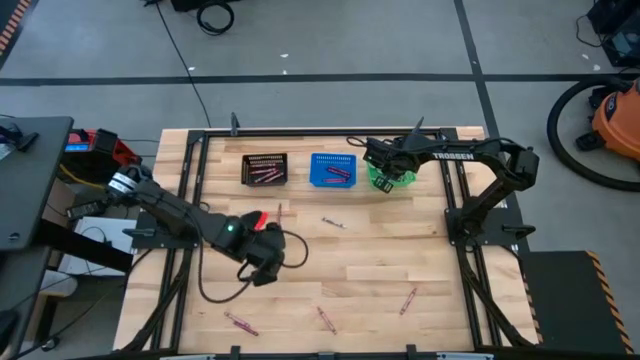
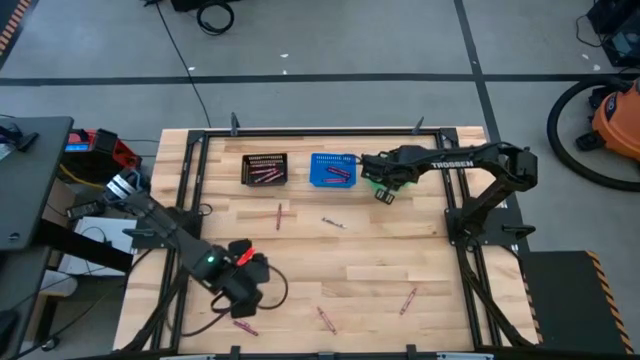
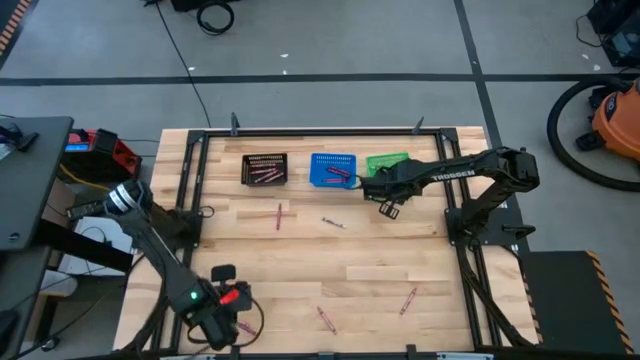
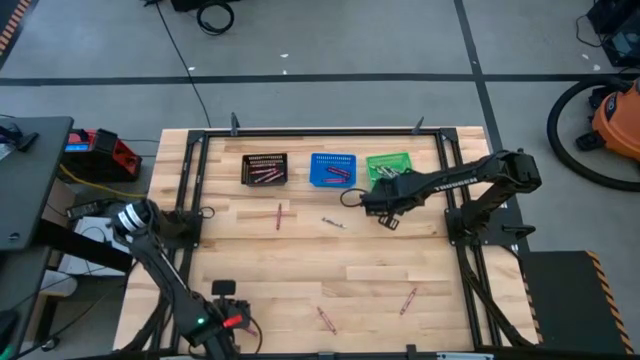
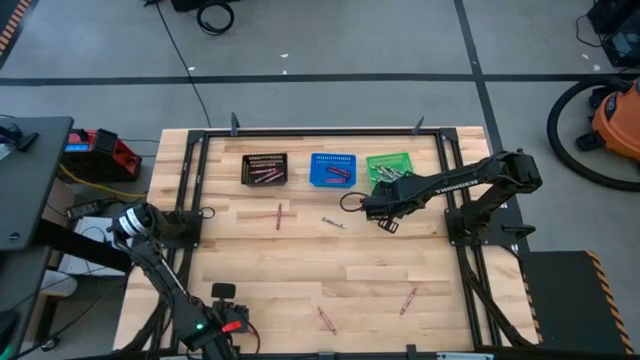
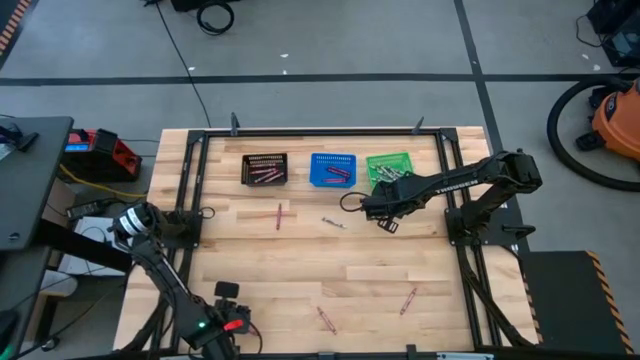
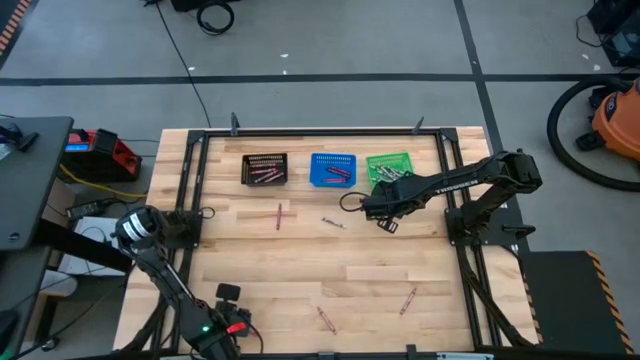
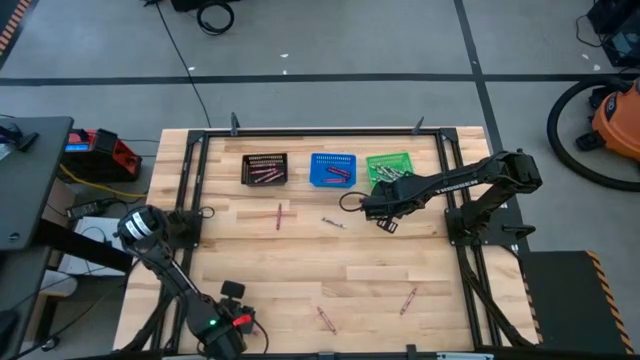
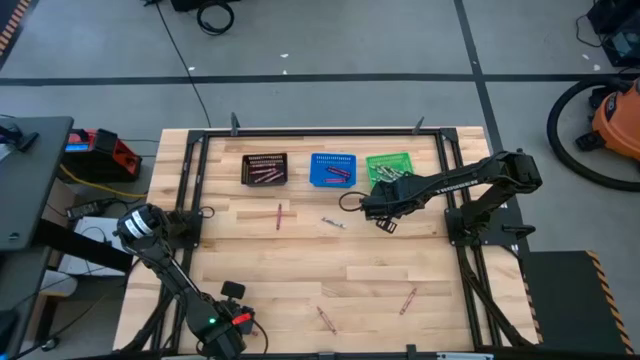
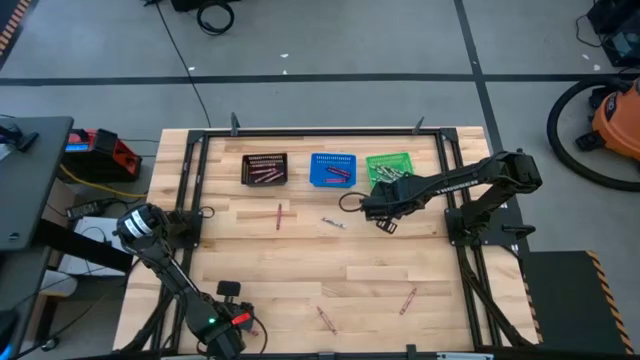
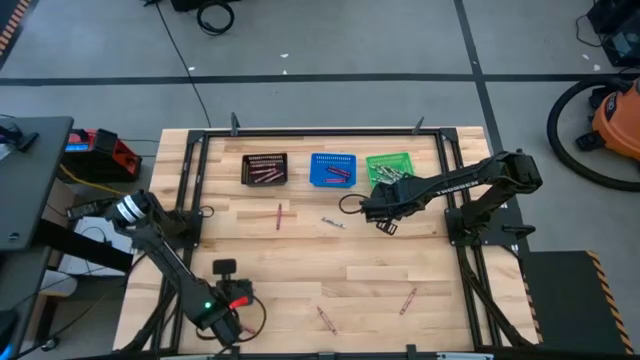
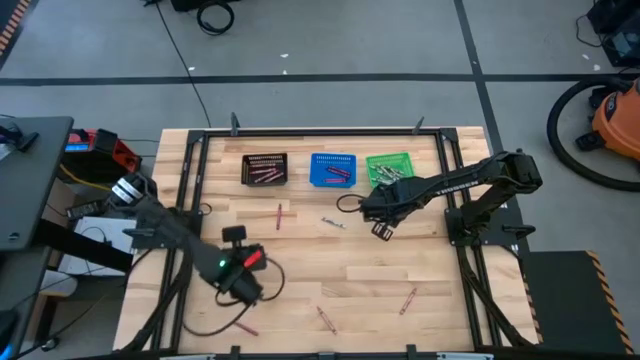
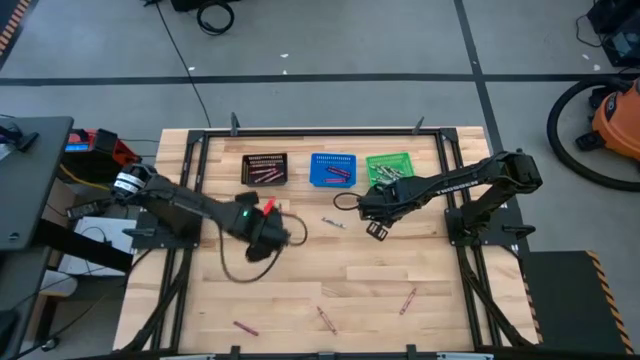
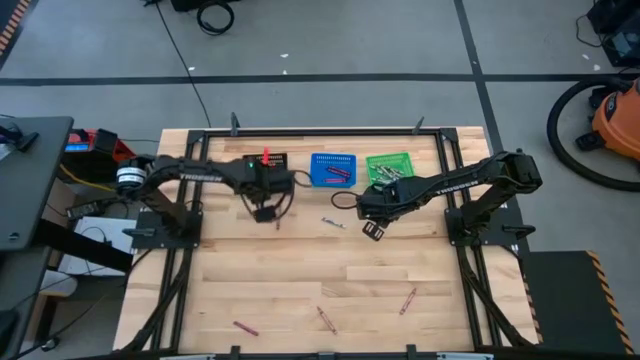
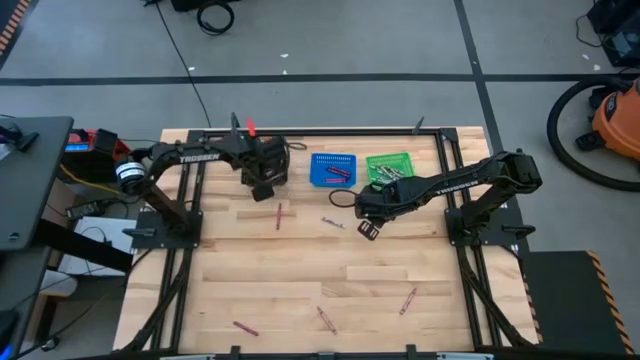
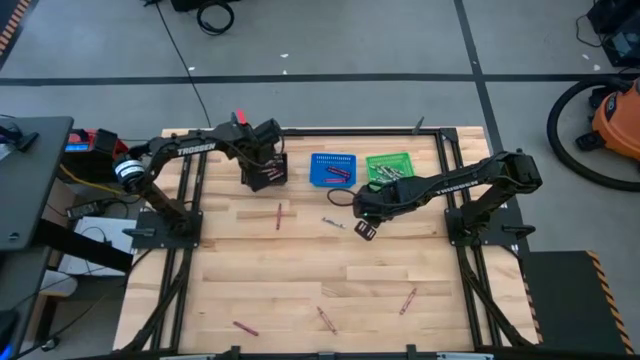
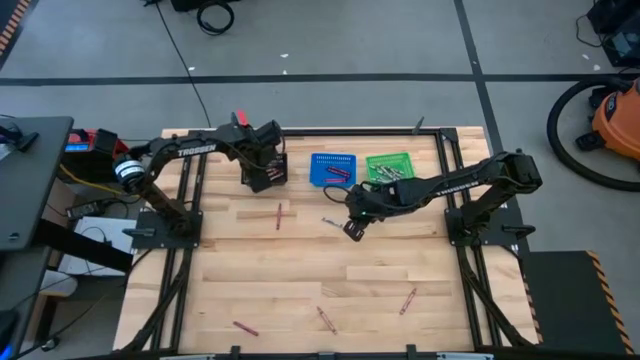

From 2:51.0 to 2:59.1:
Task: Sort crayons
Put the pink crayon into the black bin

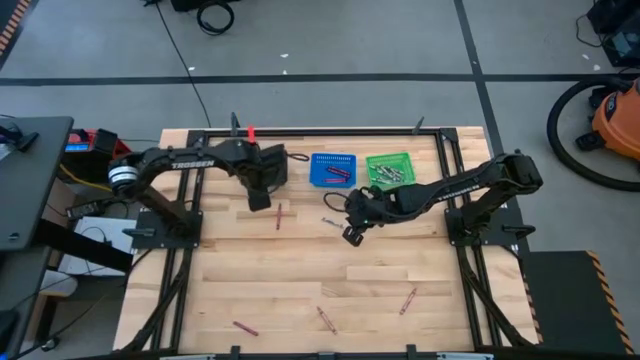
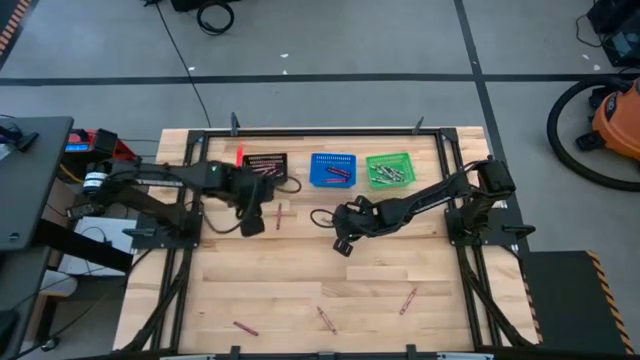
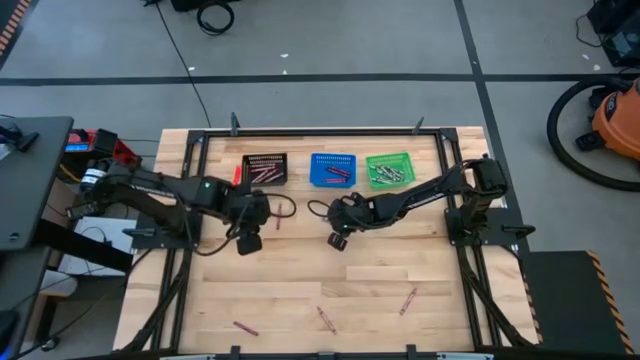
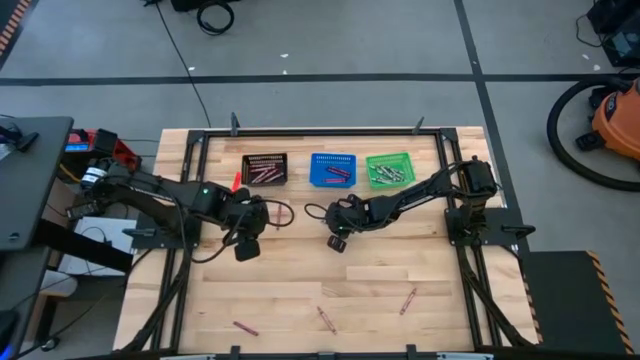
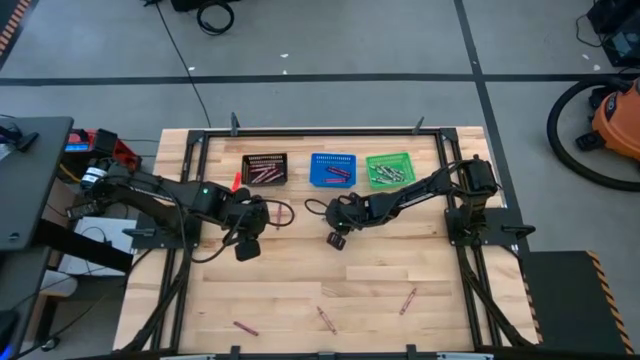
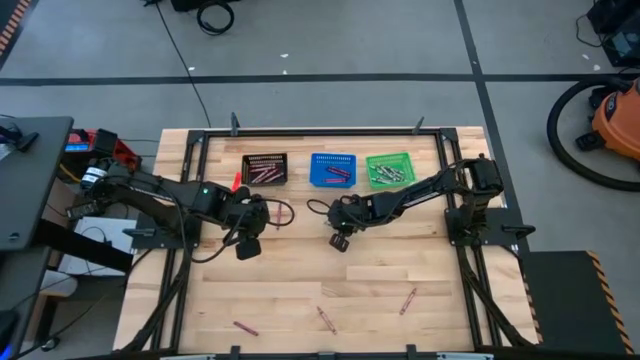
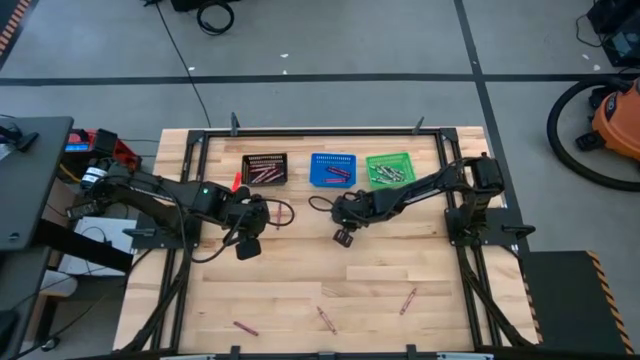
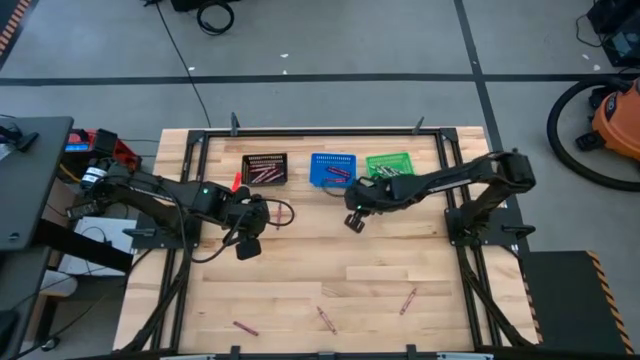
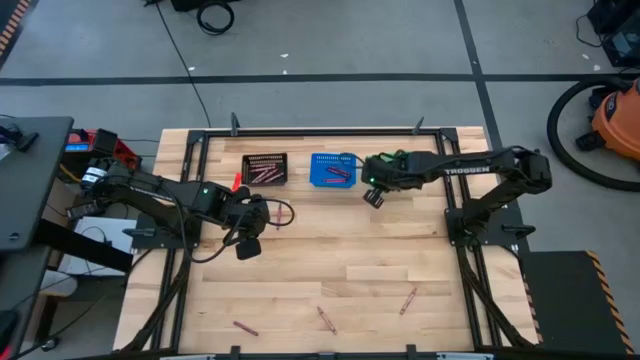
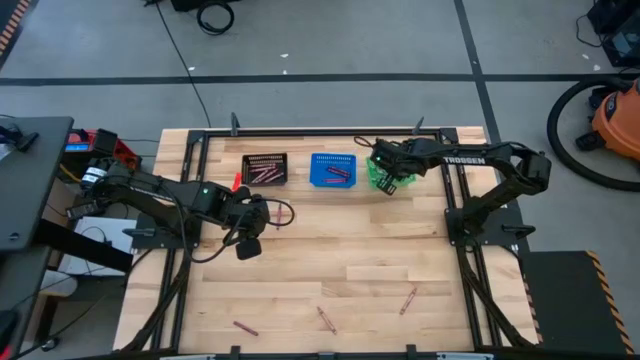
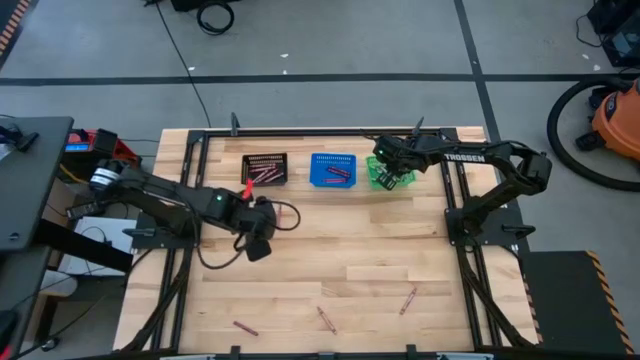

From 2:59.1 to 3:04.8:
Put the white crayon into the green bin

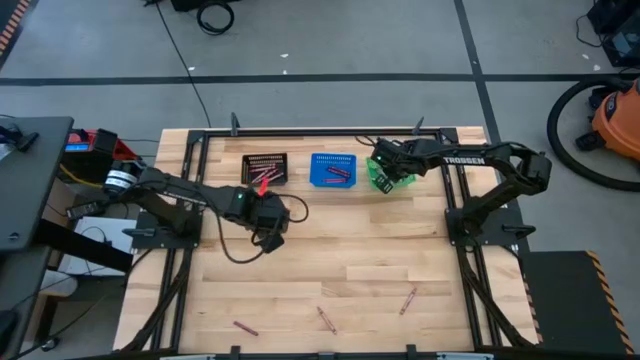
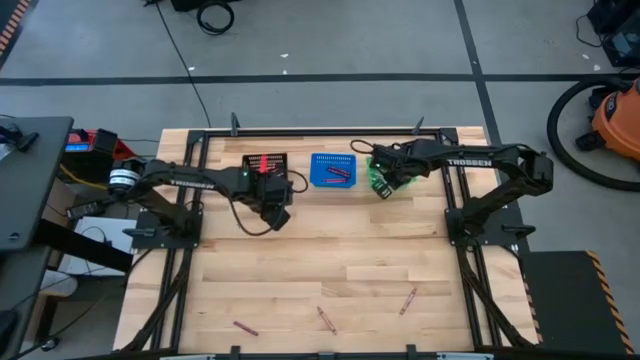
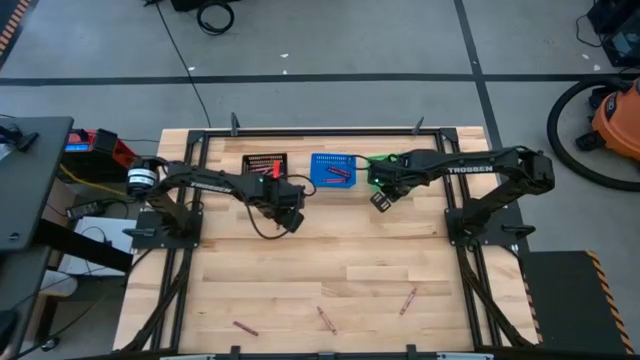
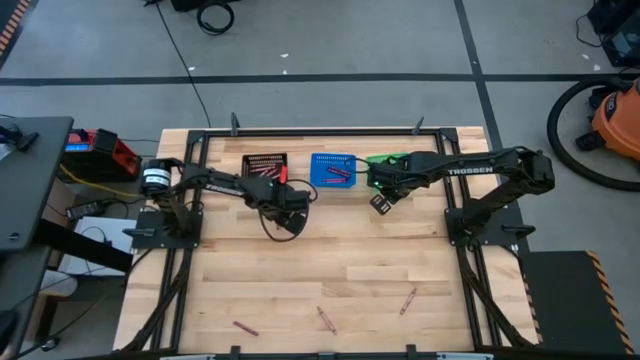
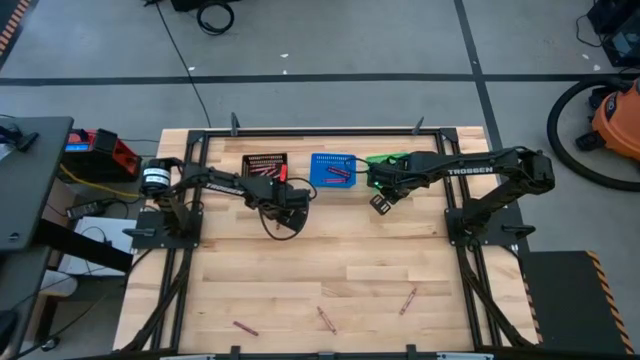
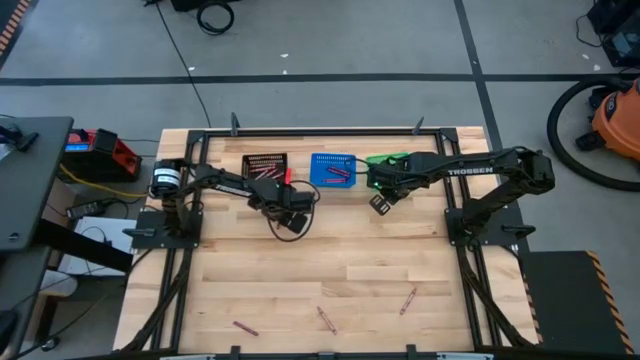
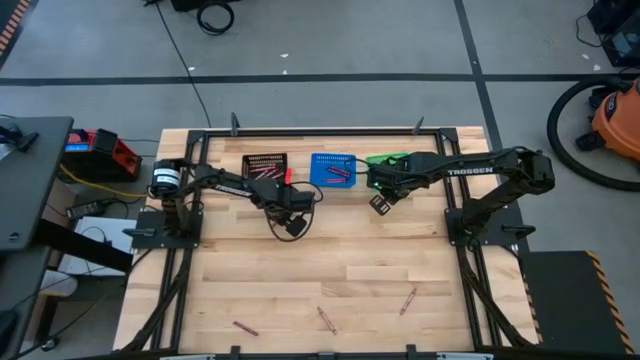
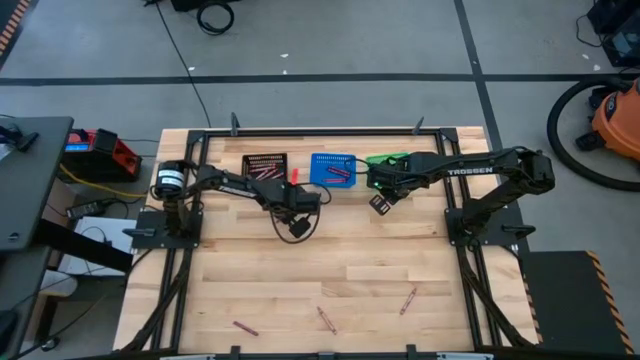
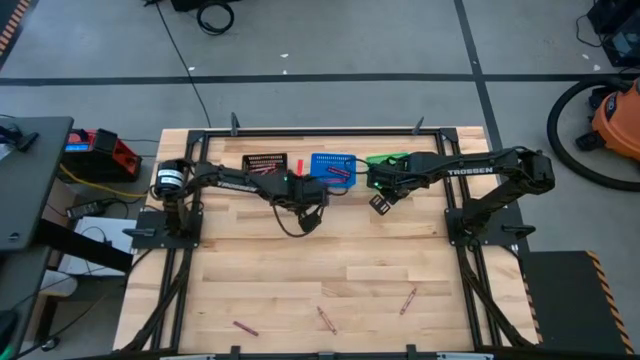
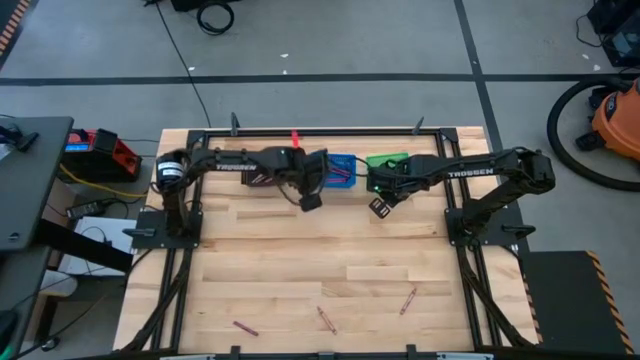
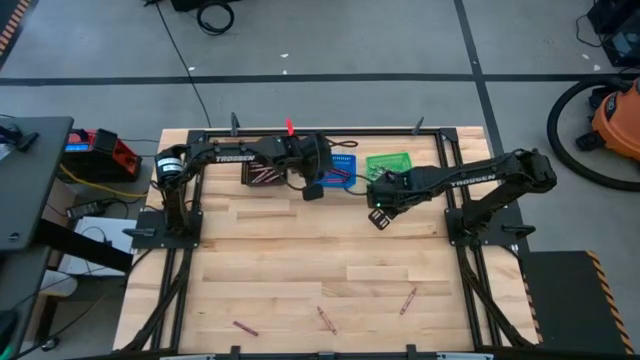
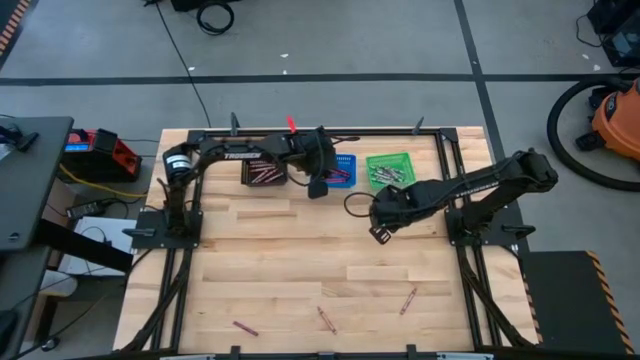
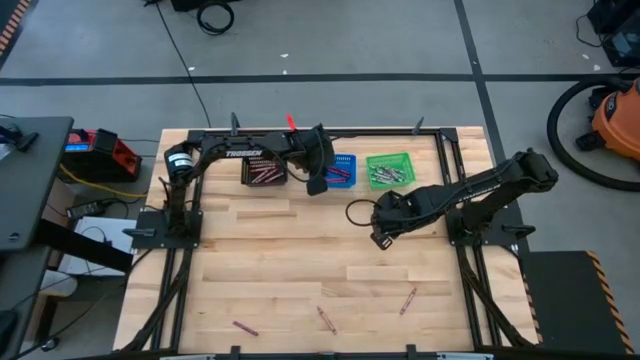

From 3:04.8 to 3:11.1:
Put the red crayon into the blue bin
